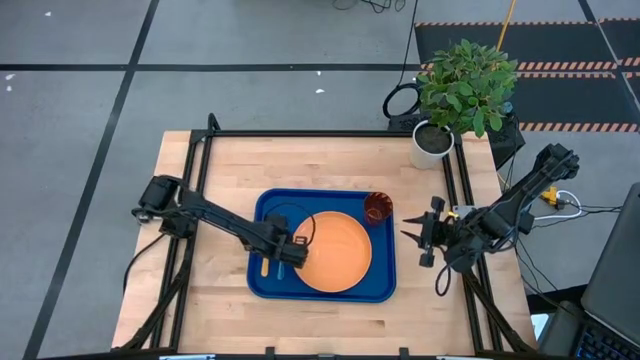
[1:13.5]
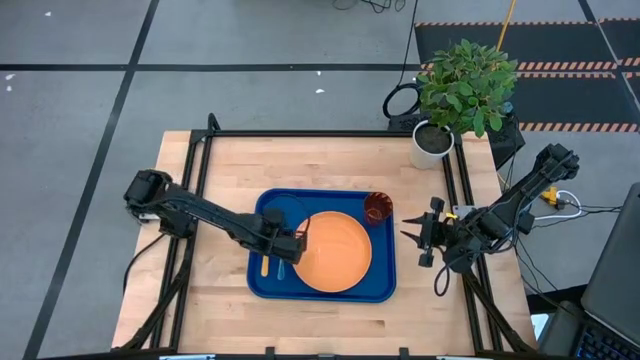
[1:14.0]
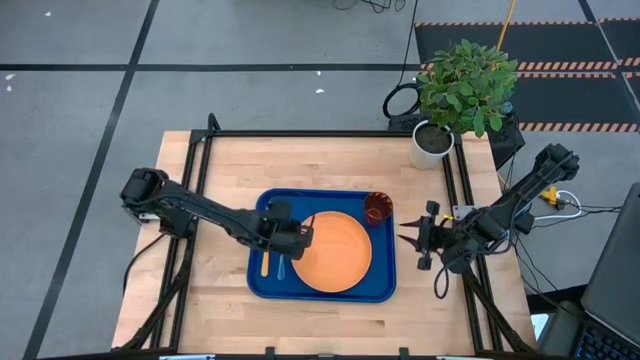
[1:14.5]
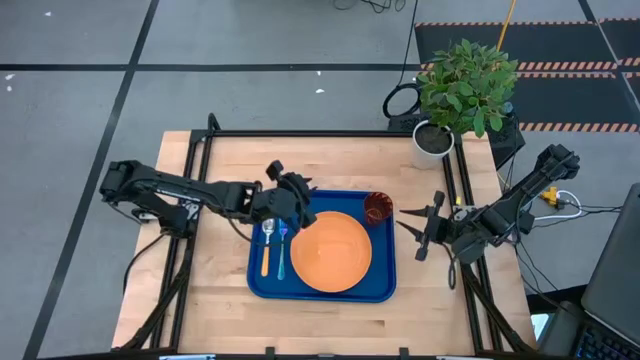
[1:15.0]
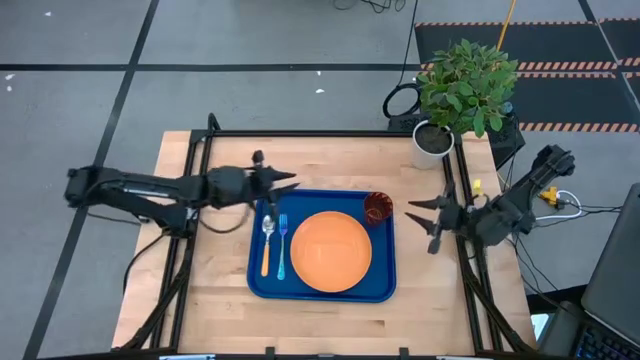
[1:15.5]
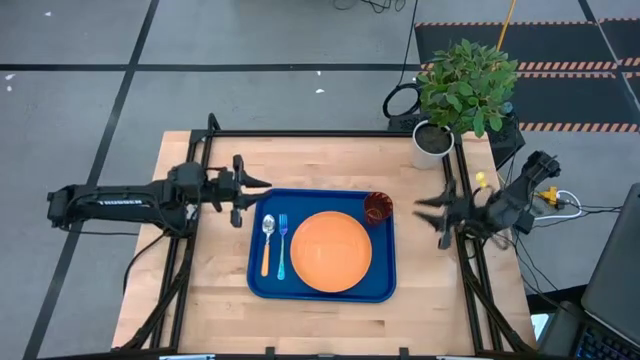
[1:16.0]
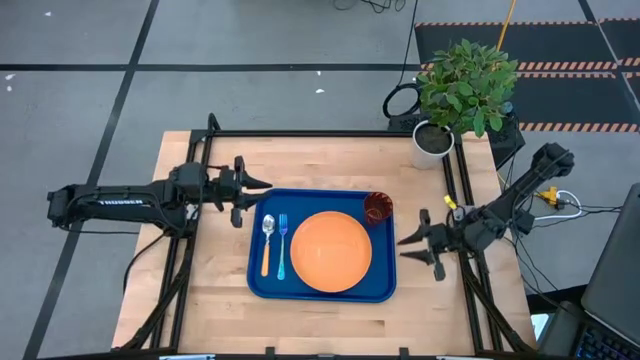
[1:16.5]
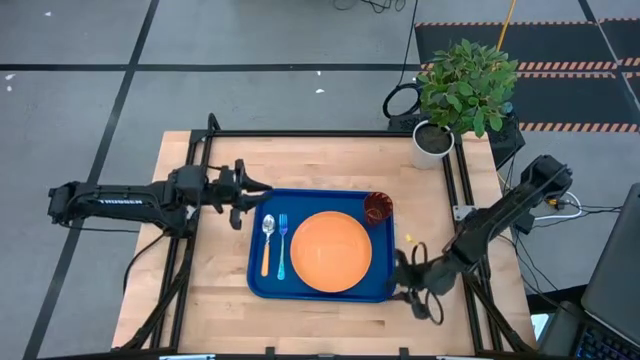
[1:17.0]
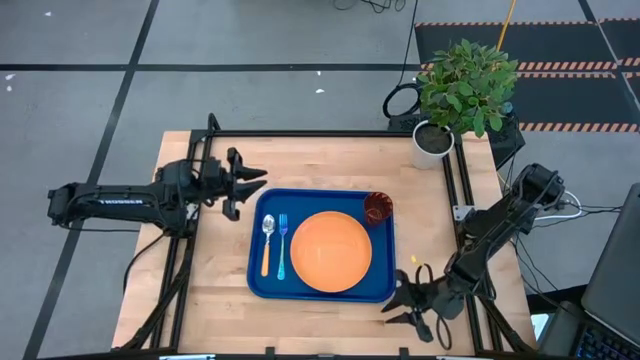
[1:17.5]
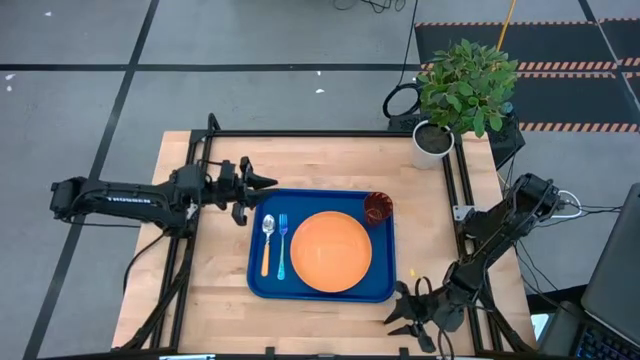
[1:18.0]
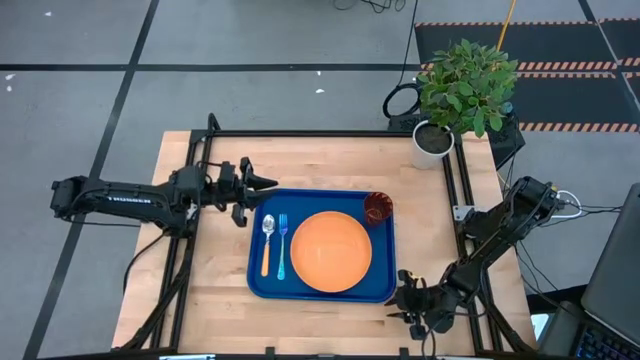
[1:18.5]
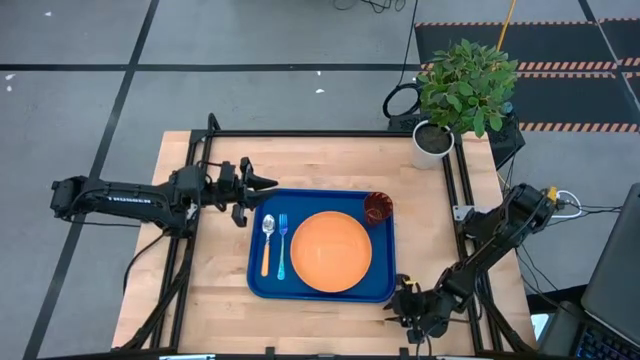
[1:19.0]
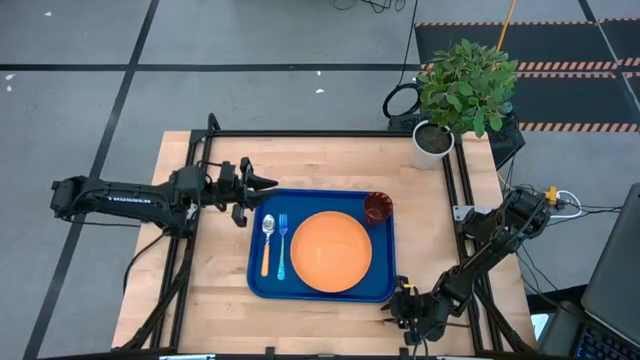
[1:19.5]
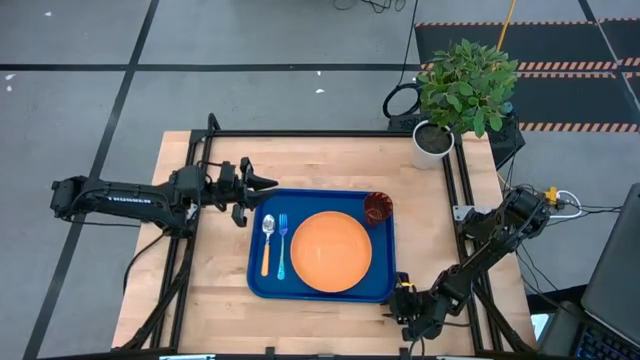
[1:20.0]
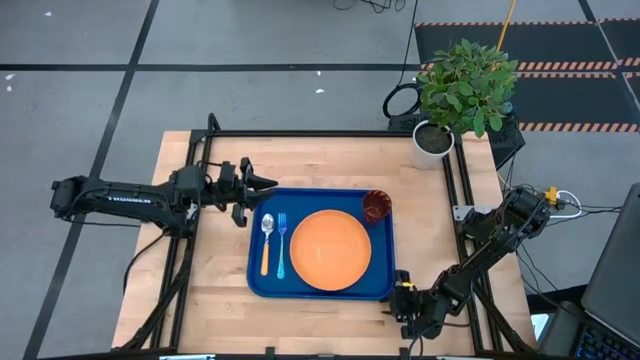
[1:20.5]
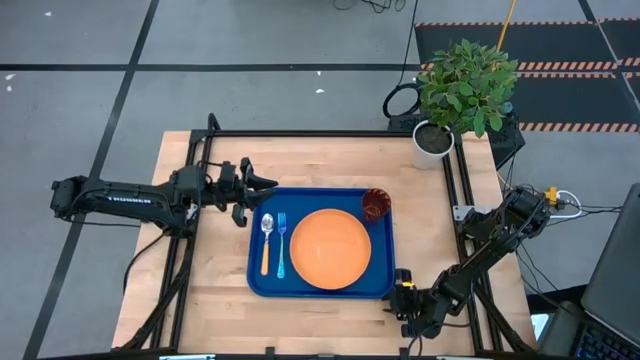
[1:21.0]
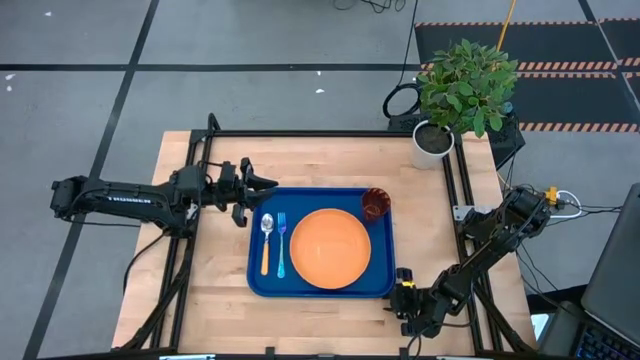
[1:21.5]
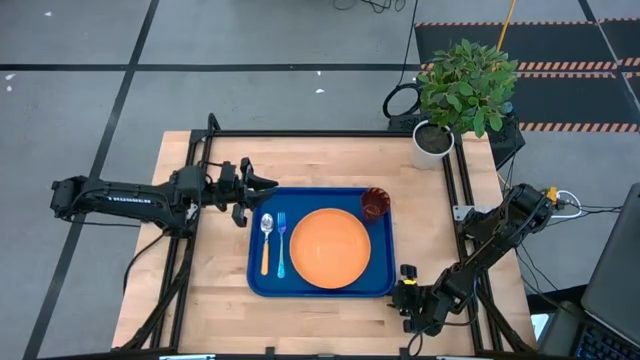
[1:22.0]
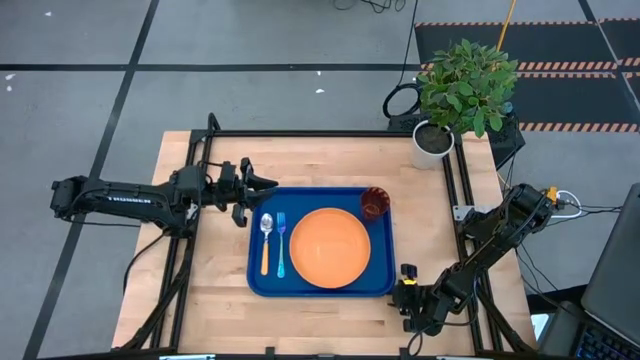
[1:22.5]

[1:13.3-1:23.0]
Task: Pick and place plate/cup/fork/spoon on tray
Adjust the blue serving tray

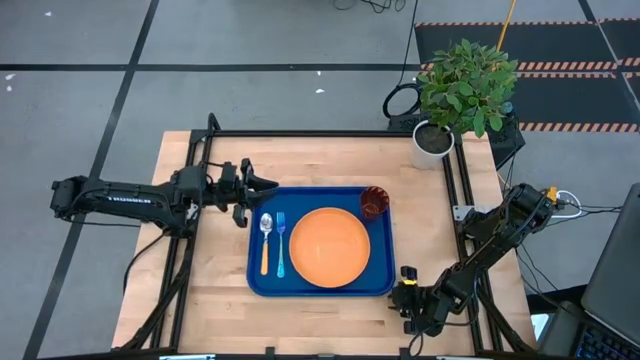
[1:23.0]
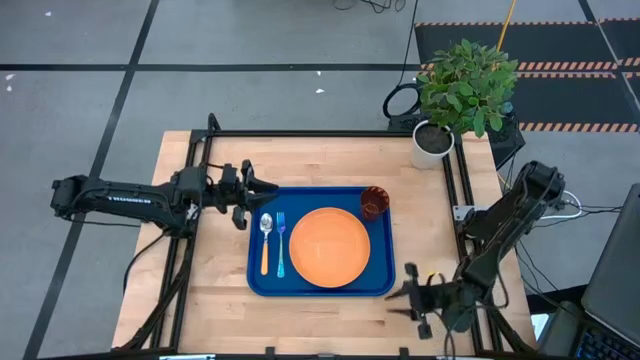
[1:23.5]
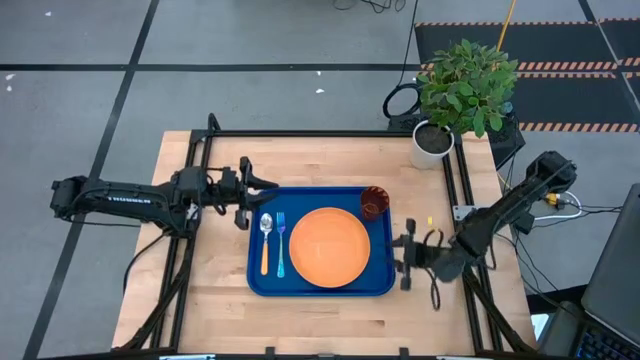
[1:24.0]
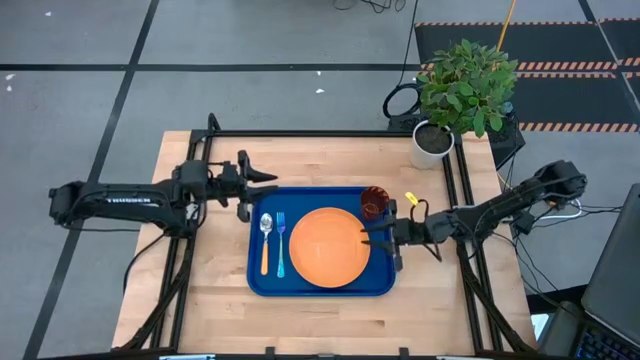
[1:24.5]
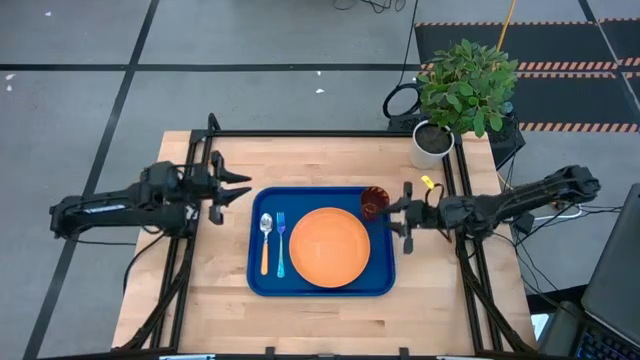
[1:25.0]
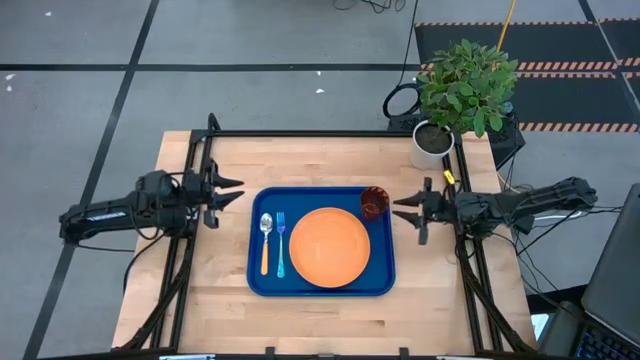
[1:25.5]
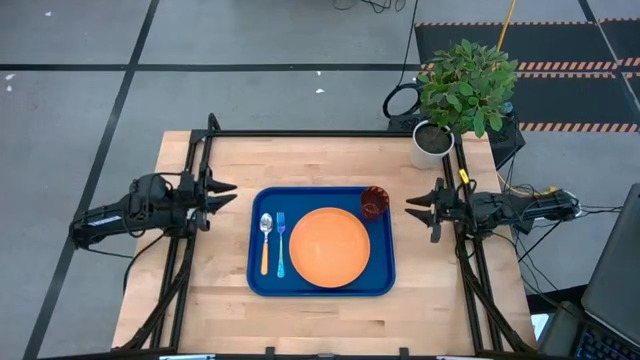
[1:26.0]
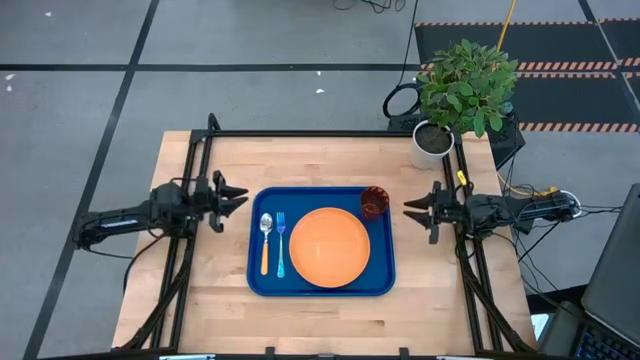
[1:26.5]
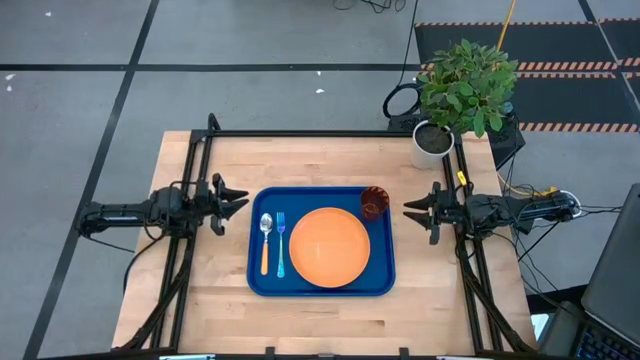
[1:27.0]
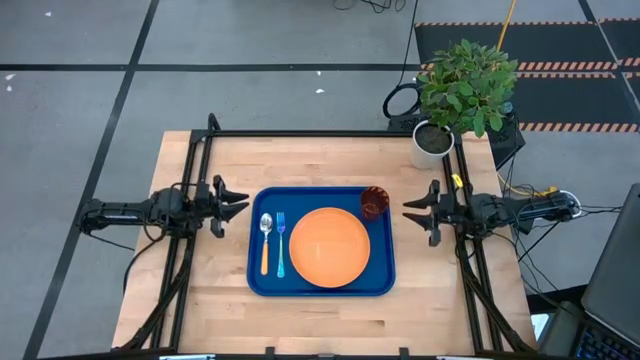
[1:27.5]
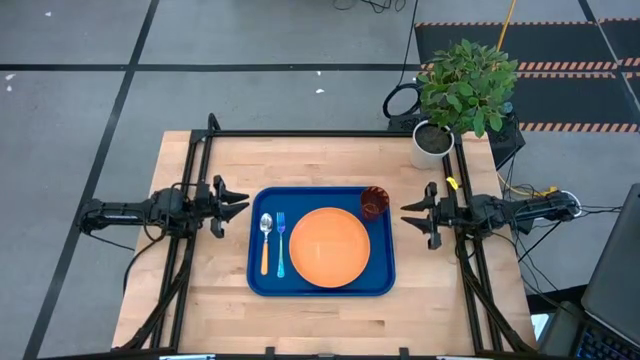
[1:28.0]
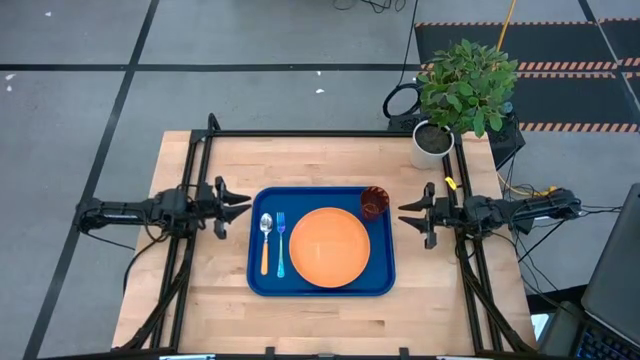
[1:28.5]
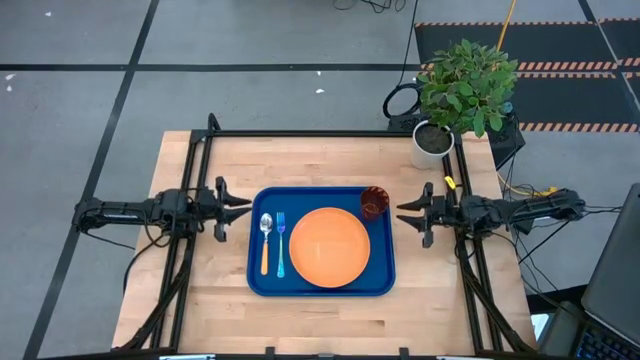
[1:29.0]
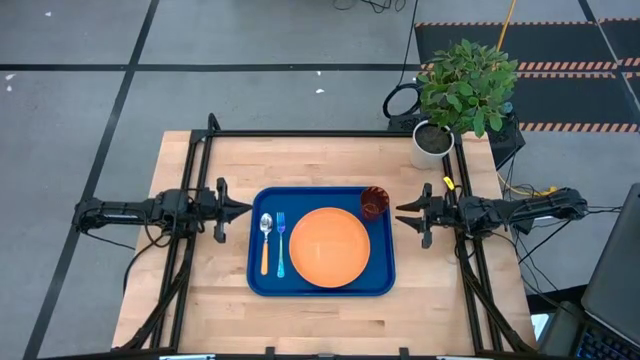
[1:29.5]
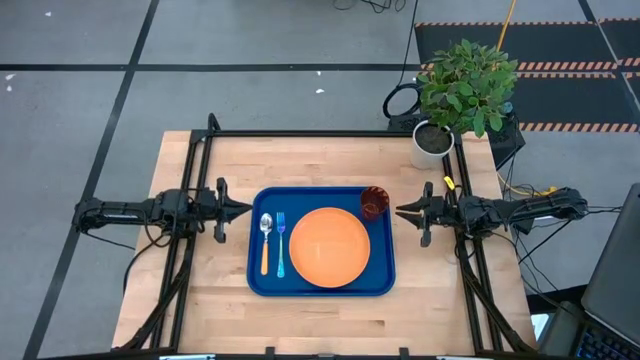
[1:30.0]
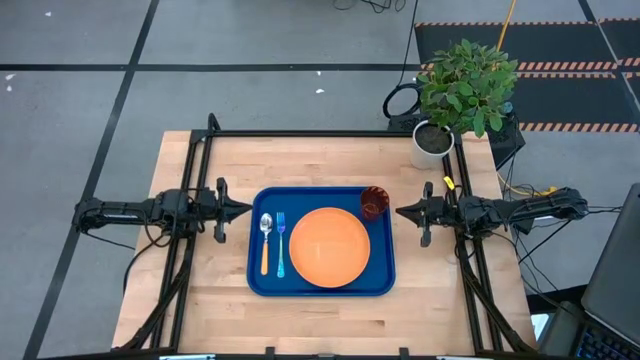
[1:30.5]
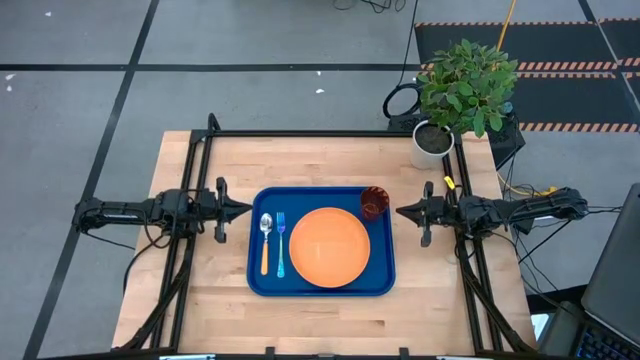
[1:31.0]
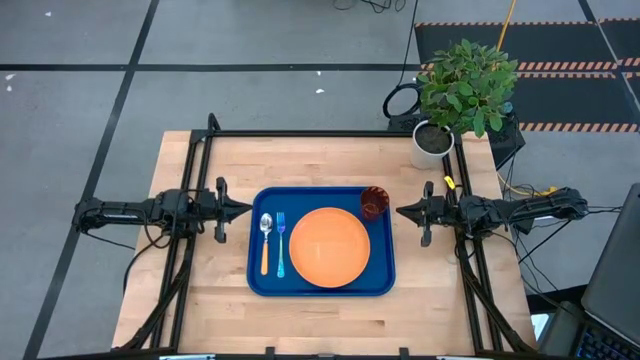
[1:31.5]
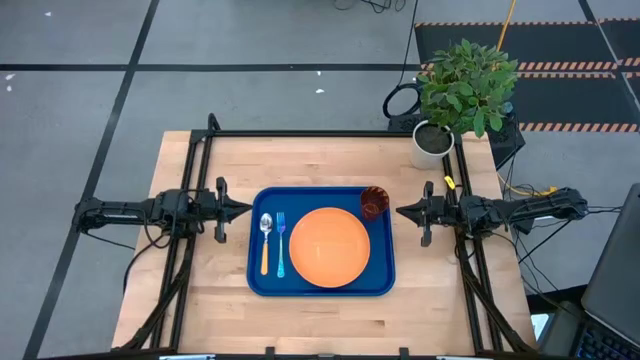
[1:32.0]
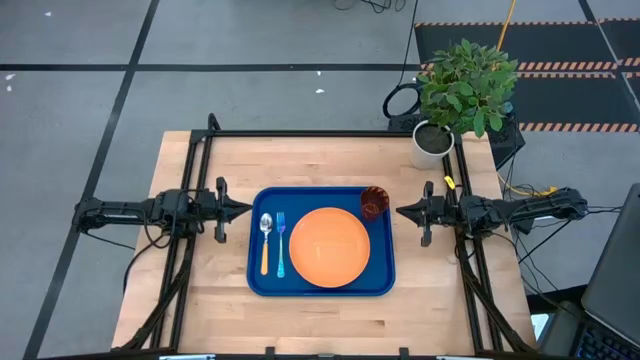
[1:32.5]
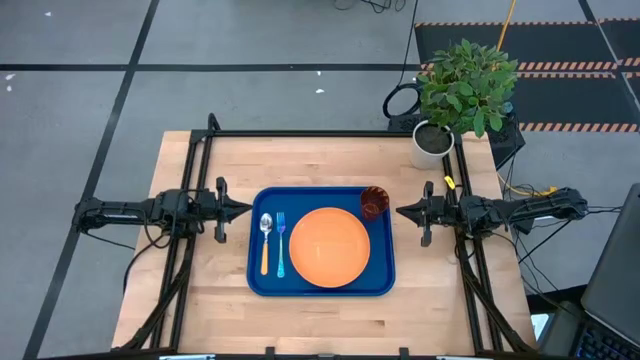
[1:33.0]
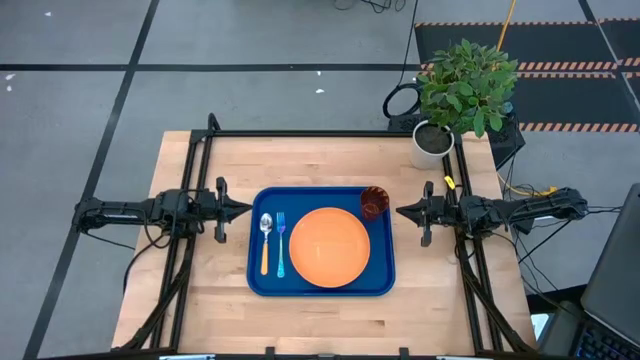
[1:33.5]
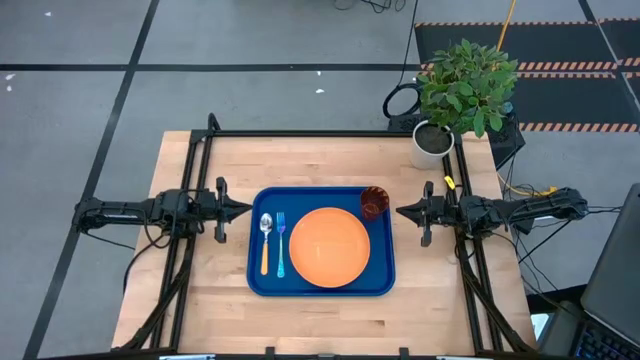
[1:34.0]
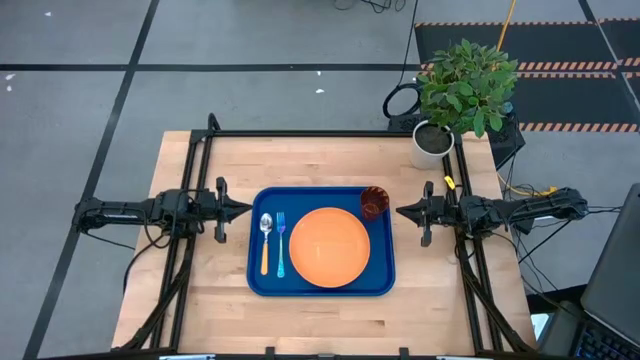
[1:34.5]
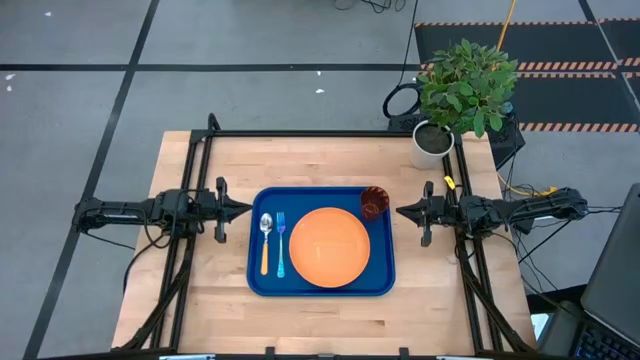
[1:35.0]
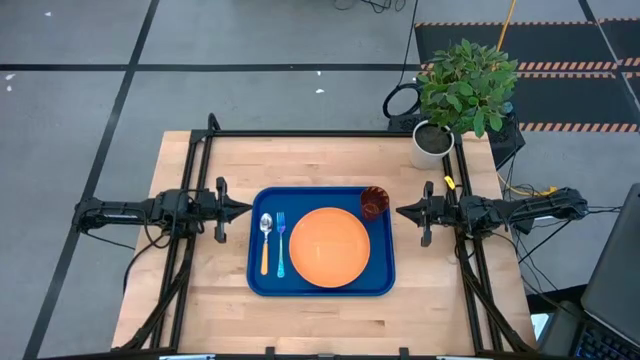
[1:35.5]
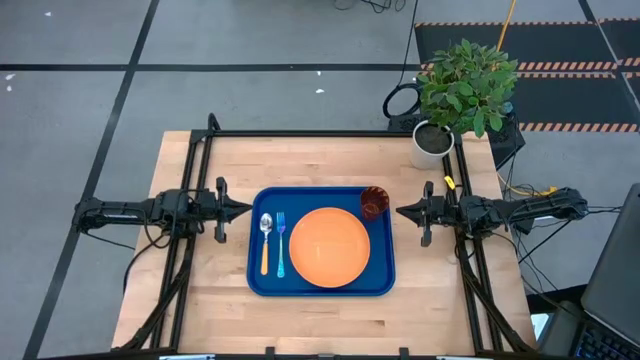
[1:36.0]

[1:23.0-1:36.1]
Return to Home Position
